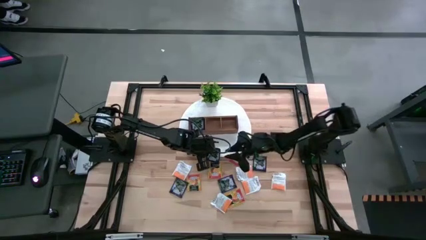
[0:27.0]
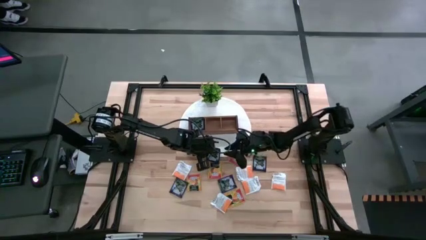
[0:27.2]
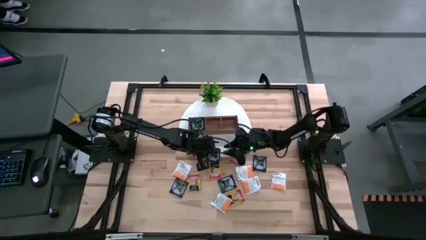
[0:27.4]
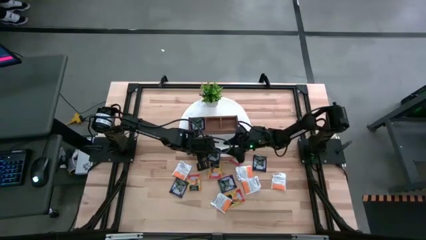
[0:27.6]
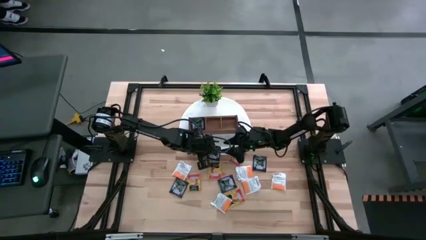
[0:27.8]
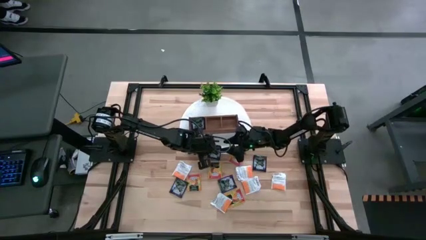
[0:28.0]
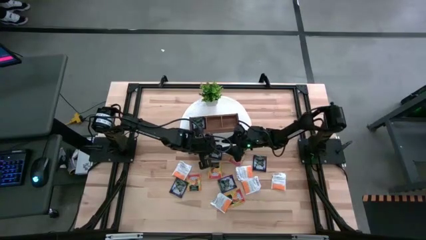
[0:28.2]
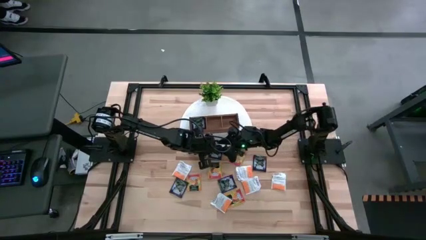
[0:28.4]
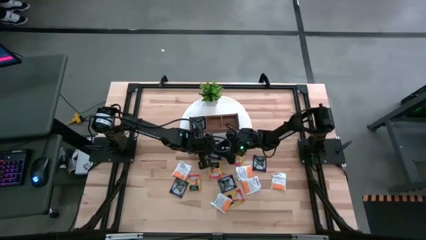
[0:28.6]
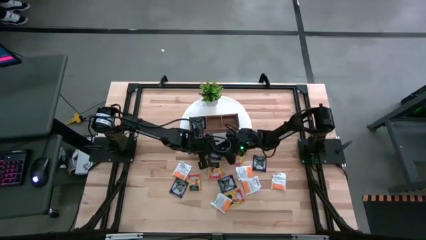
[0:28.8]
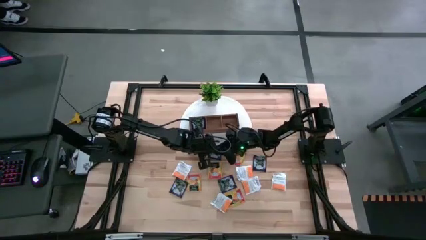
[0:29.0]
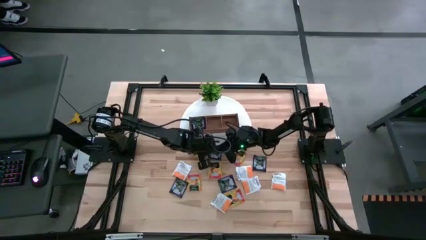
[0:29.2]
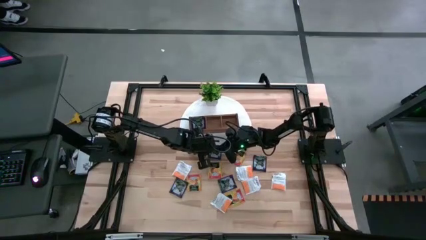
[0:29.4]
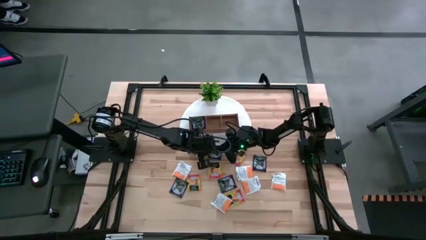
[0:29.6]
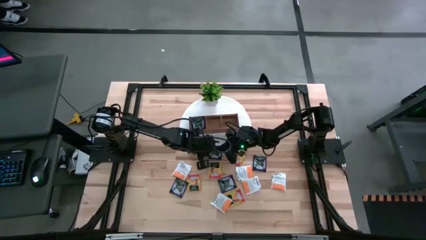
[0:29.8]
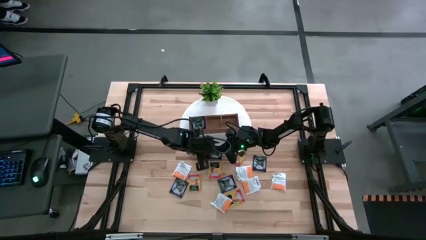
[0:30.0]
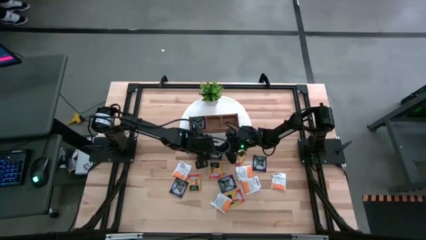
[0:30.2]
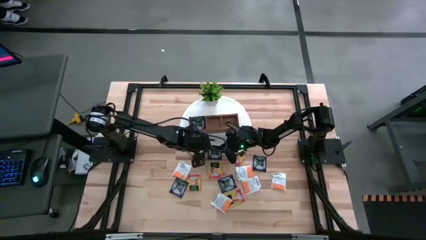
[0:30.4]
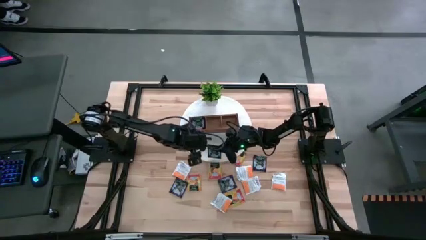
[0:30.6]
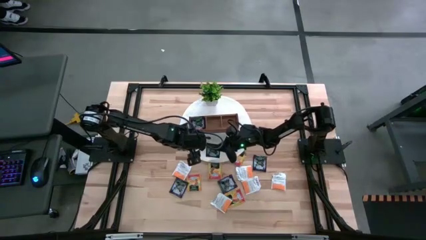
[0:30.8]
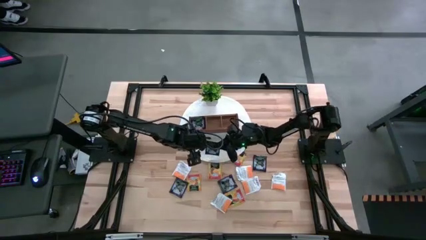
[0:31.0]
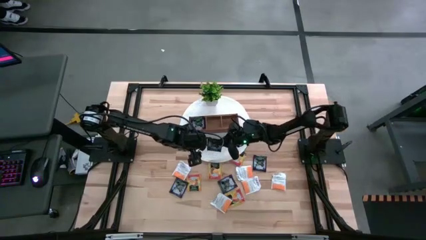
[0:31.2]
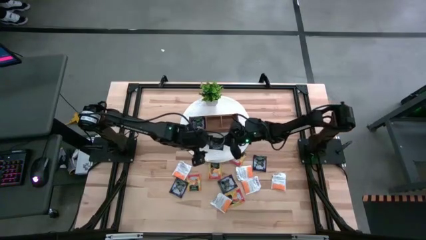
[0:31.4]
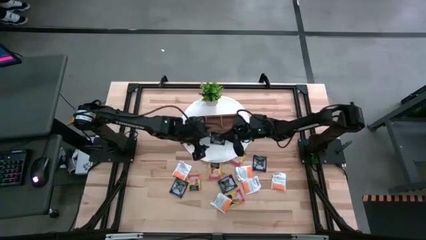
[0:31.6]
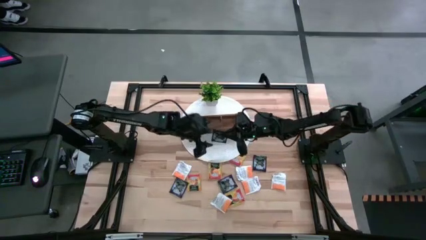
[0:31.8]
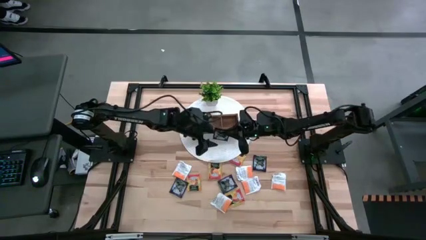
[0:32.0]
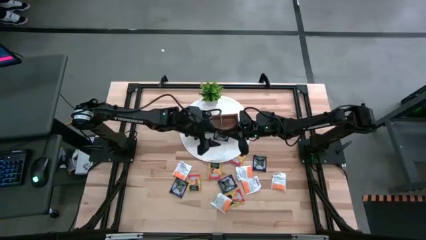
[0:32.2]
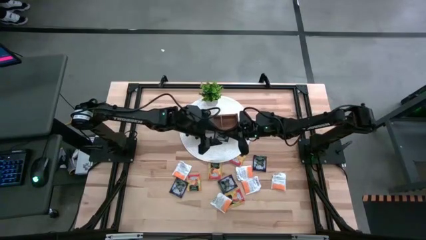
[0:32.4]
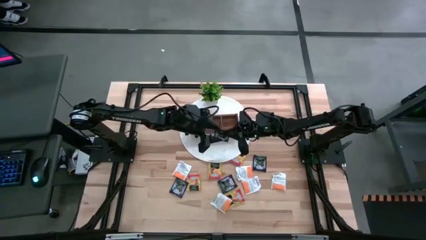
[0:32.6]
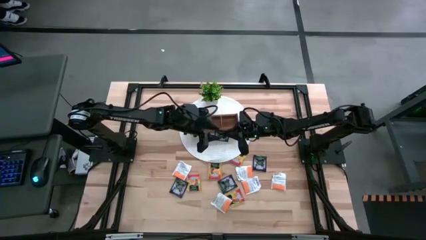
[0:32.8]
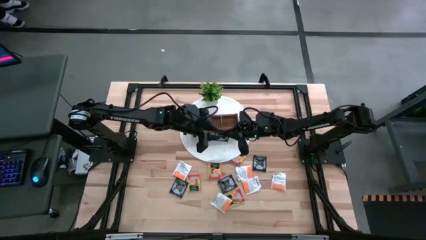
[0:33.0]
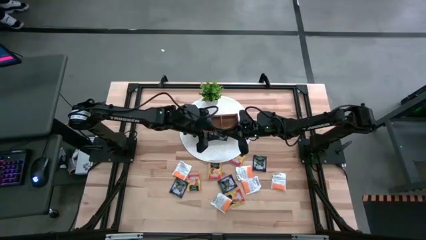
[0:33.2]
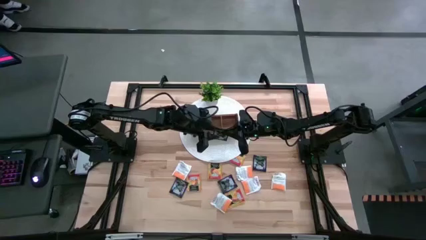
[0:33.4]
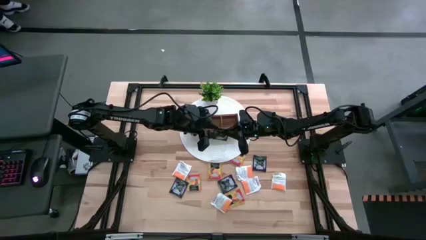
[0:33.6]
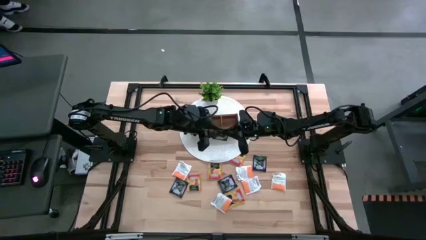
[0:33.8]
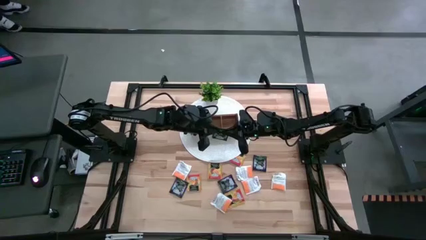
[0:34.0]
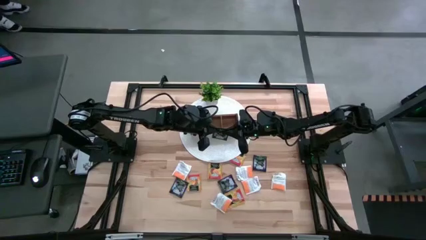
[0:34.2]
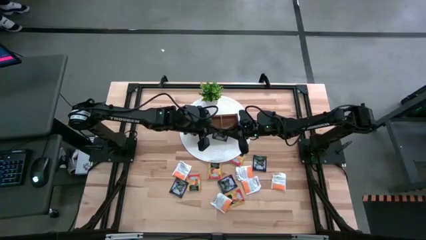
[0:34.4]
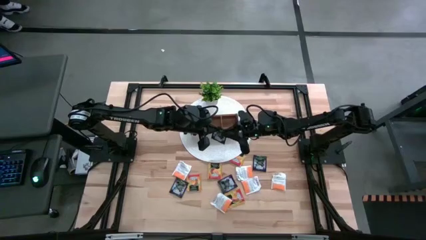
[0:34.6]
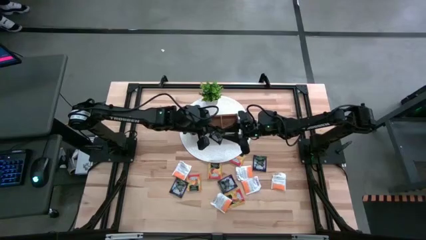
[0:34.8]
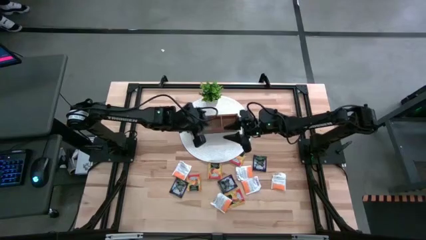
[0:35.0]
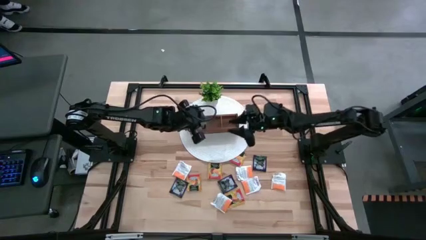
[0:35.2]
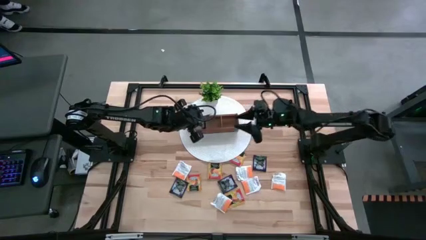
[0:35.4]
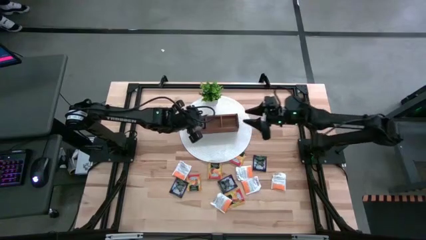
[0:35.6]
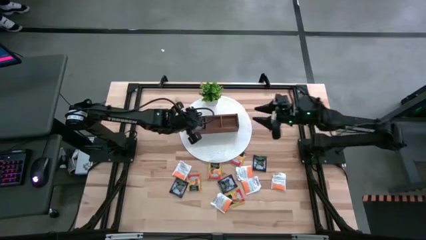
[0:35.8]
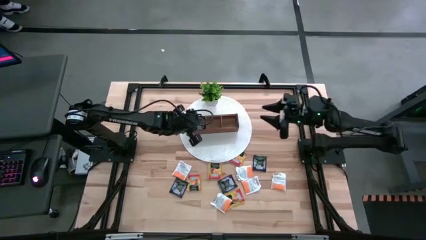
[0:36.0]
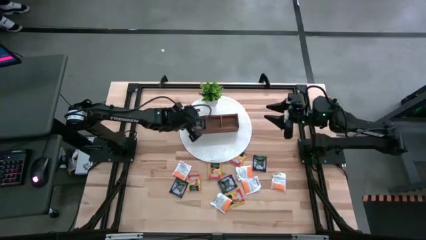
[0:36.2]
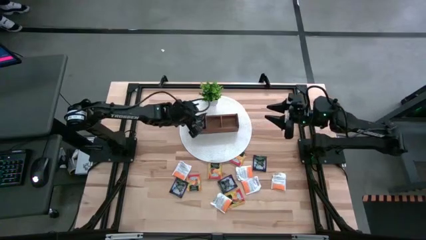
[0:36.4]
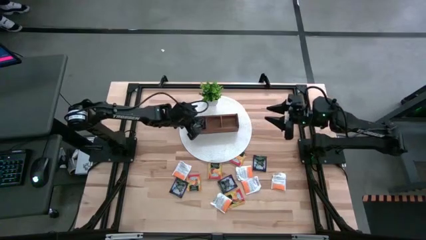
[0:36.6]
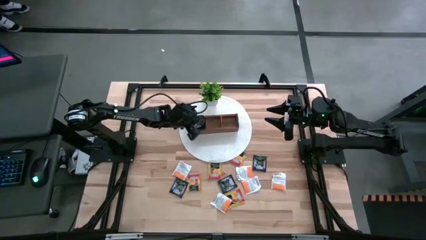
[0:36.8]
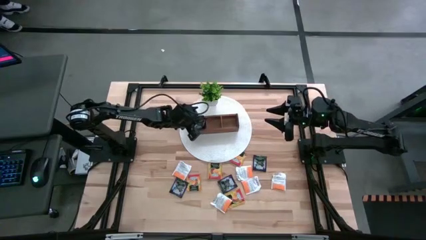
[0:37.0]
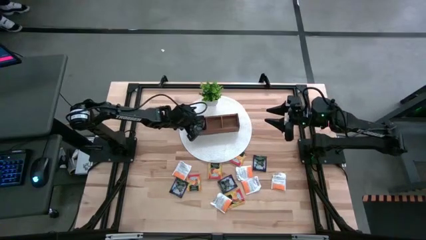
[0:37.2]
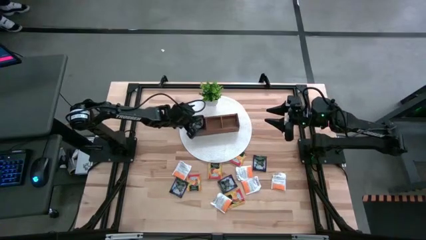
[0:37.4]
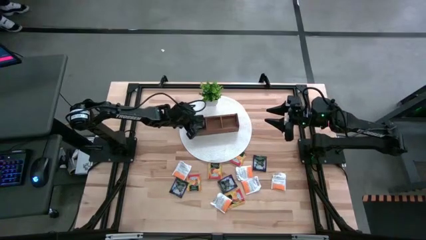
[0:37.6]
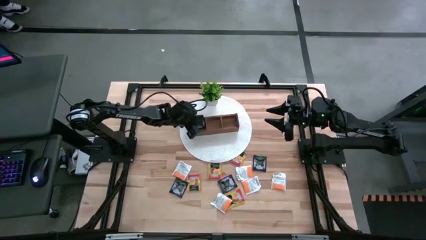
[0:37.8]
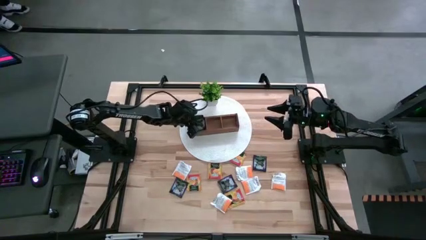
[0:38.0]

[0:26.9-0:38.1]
Task: Pick & Place Tea
Put the black tea bag into the left section of the wooden organizer

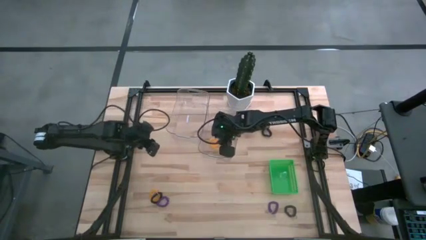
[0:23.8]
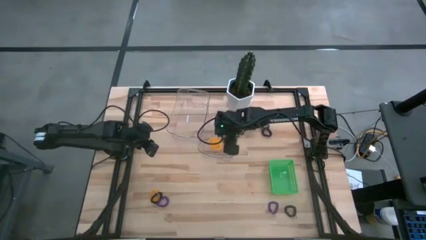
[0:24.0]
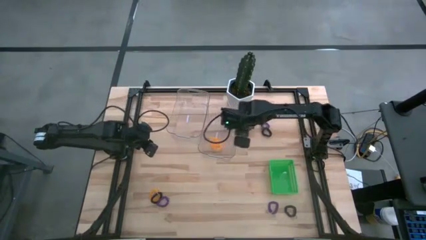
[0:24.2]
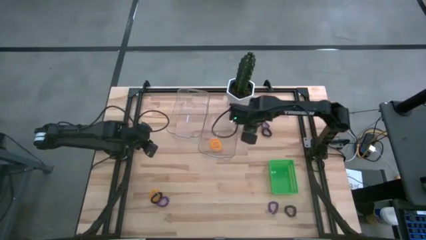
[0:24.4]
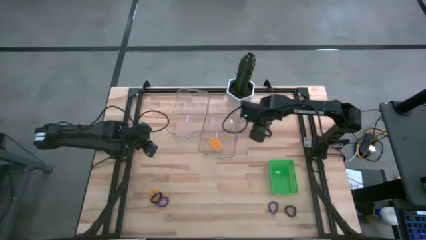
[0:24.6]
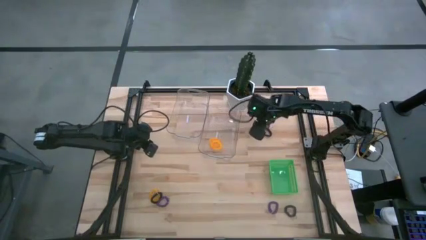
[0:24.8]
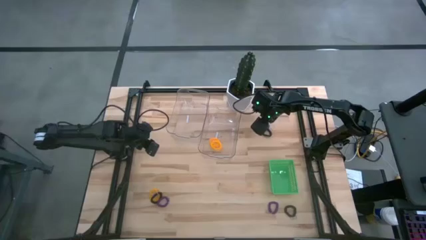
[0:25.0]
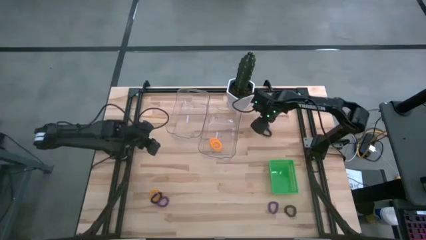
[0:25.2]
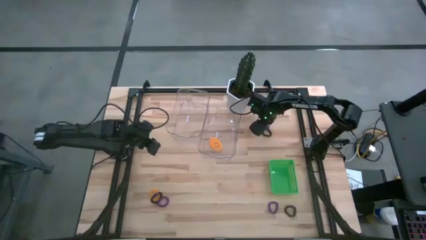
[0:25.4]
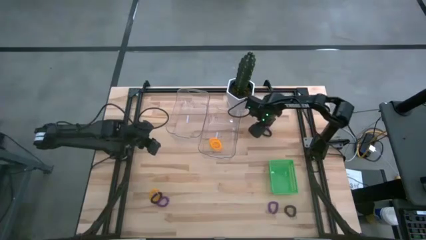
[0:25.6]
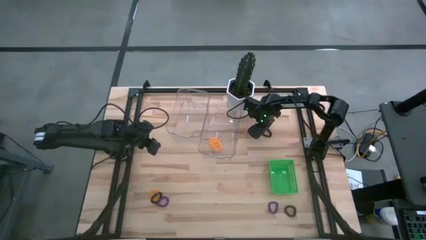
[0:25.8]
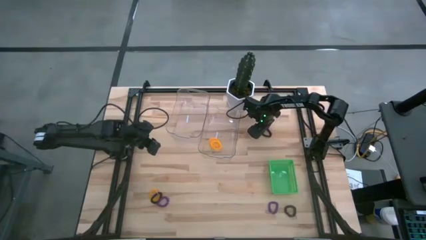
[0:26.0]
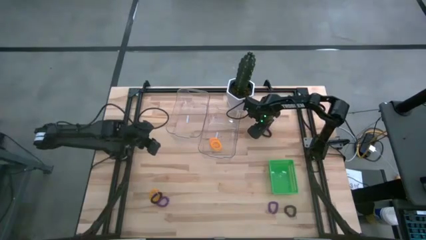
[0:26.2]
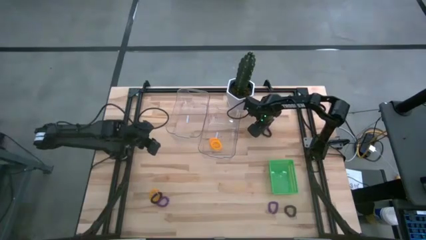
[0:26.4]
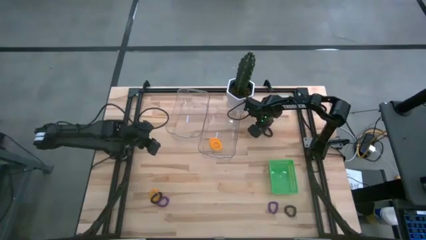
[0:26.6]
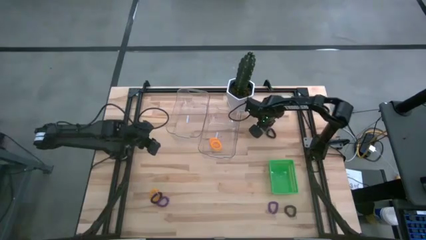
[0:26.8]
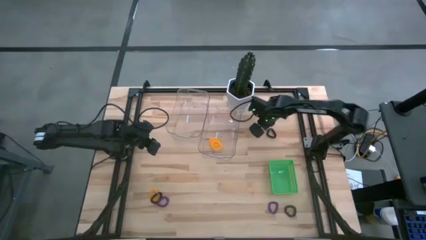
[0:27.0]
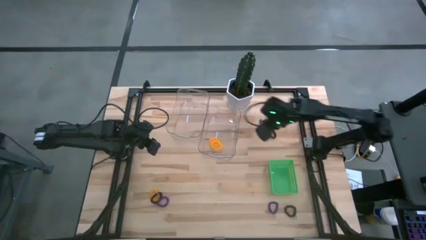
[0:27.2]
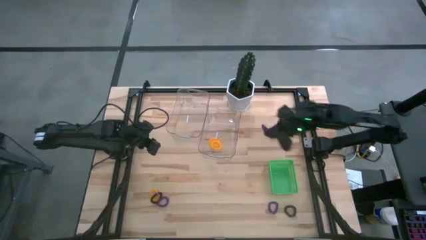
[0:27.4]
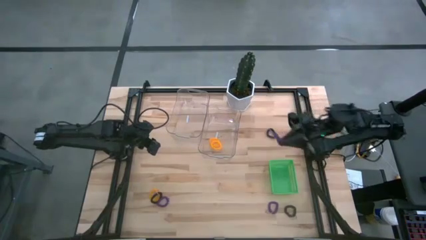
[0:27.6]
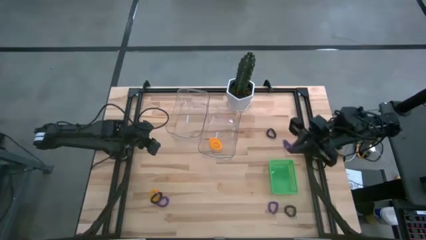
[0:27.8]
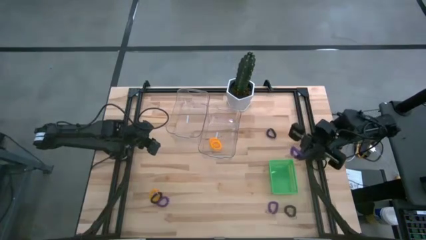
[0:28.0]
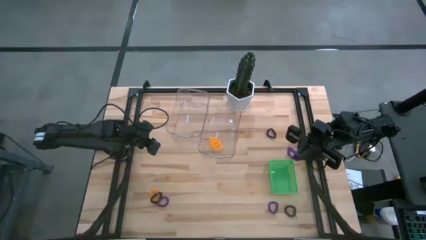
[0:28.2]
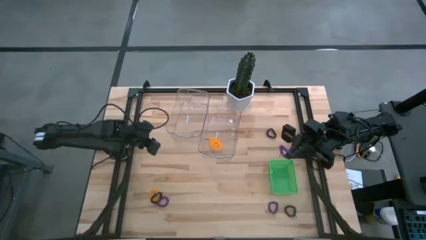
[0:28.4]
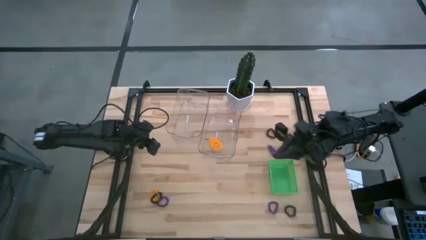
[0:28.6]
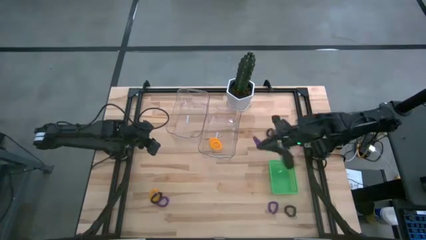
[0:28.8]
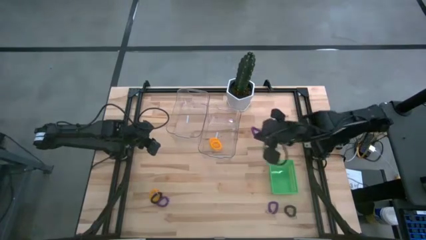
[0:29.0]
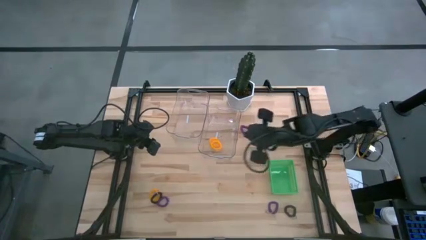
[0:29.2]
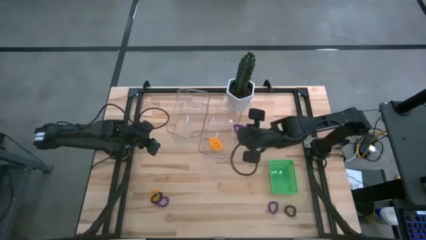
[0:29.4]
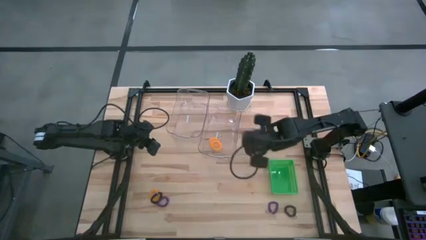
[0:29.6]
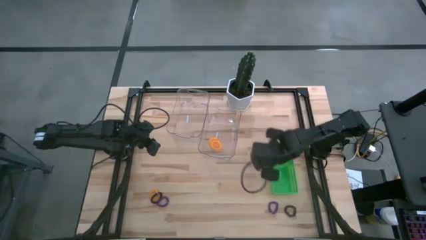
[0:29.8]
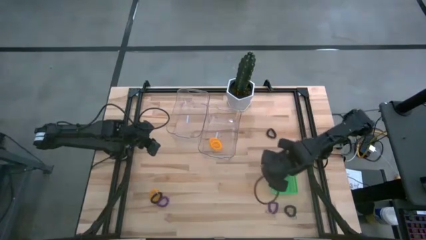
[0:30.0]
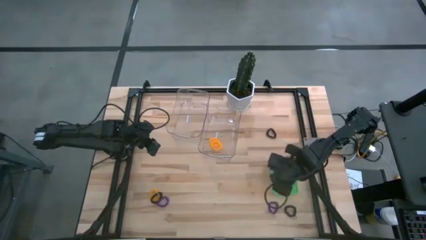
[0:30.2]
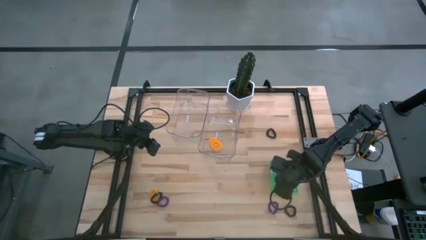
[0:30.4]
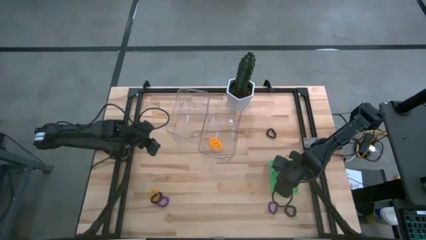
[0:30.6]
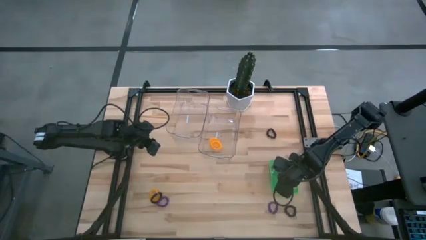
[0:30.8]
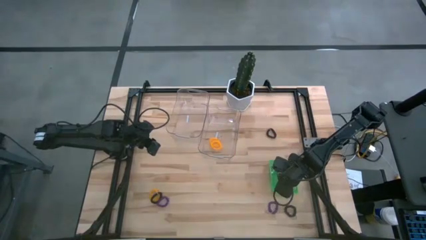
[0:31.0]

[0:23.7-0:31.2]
Task: Sort spring keychains
Put the top violet spring keychain into the green bin
